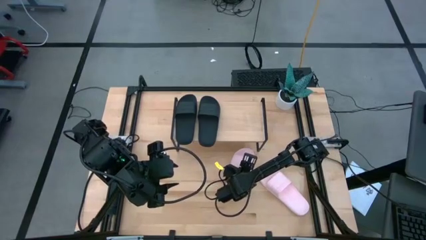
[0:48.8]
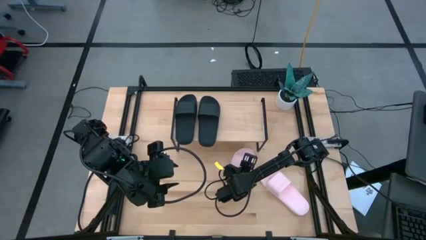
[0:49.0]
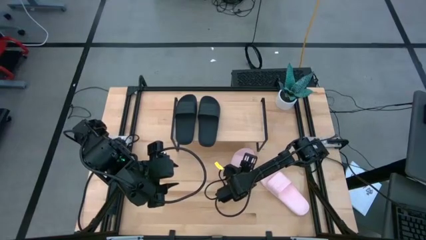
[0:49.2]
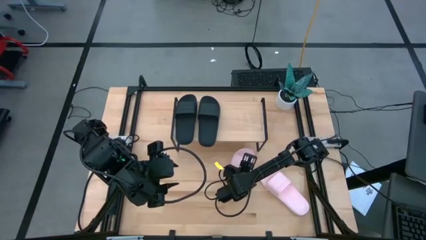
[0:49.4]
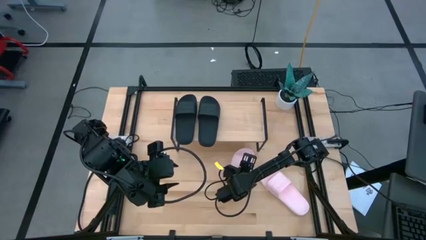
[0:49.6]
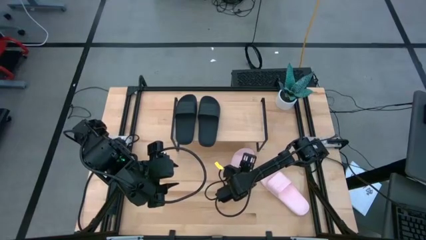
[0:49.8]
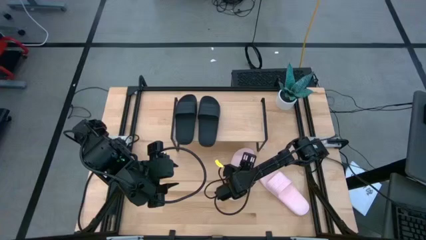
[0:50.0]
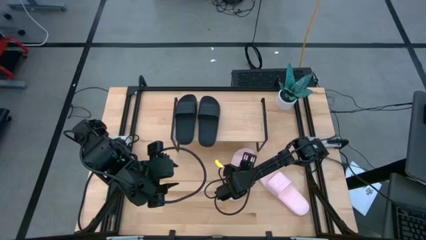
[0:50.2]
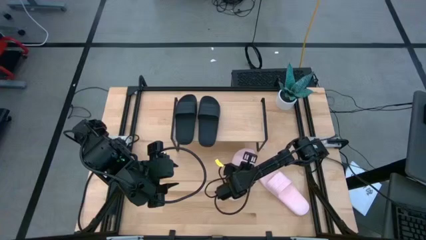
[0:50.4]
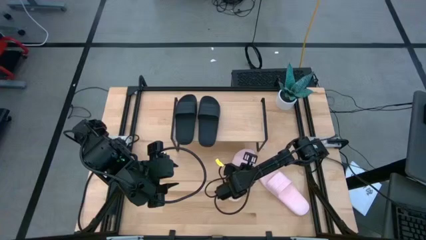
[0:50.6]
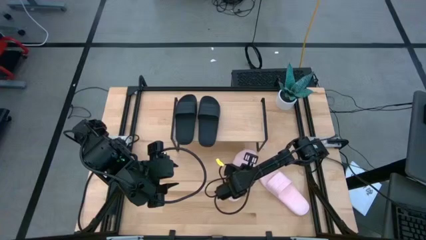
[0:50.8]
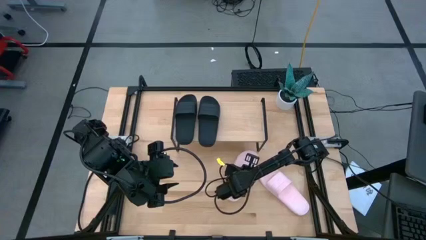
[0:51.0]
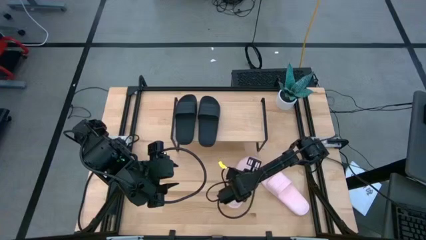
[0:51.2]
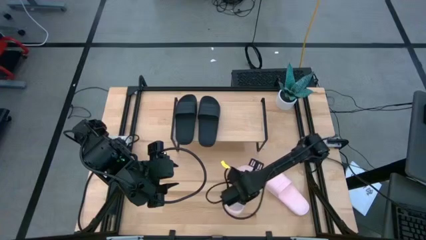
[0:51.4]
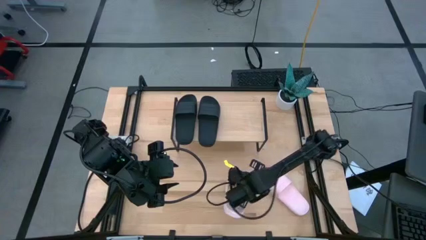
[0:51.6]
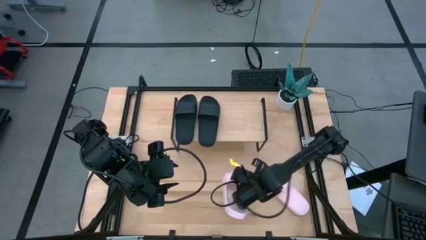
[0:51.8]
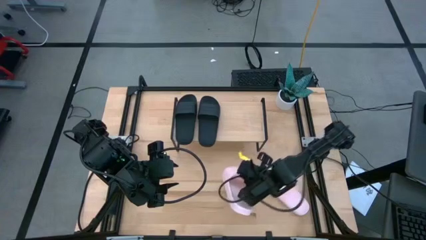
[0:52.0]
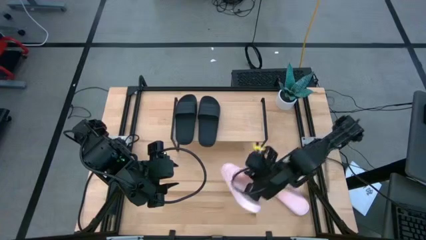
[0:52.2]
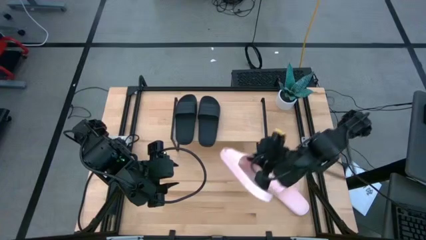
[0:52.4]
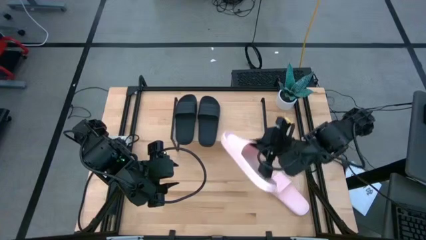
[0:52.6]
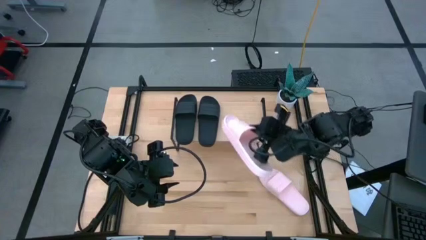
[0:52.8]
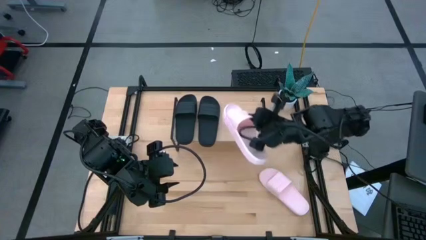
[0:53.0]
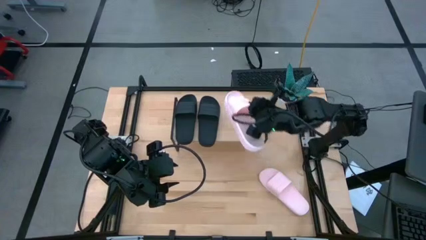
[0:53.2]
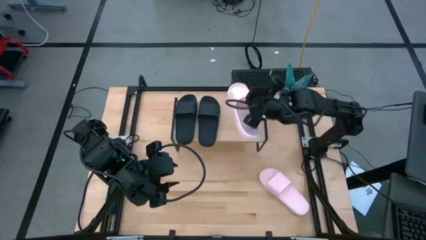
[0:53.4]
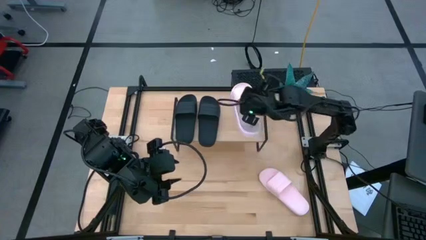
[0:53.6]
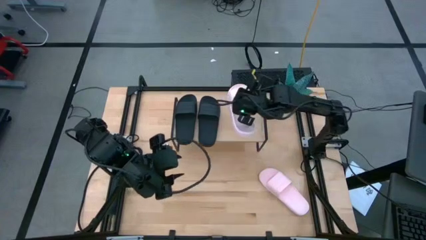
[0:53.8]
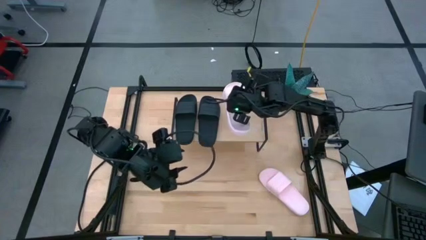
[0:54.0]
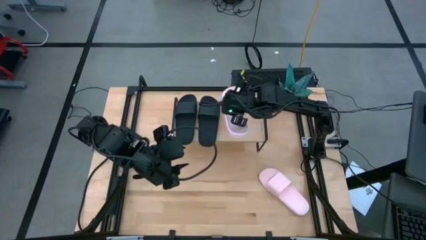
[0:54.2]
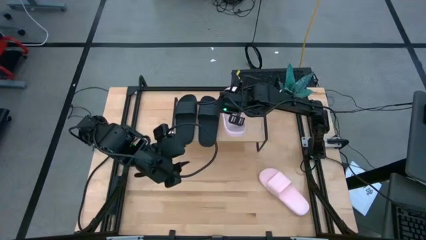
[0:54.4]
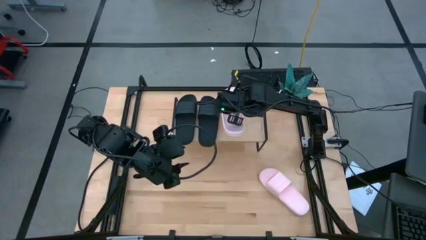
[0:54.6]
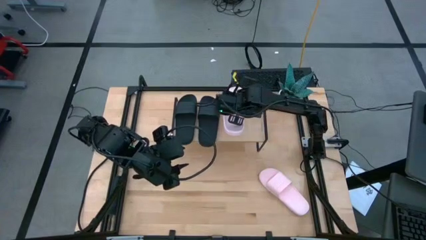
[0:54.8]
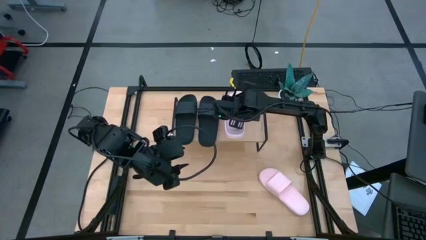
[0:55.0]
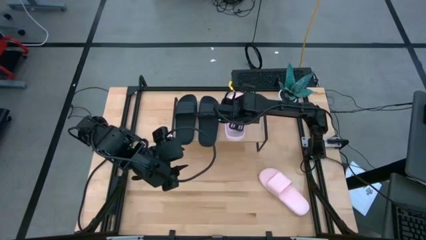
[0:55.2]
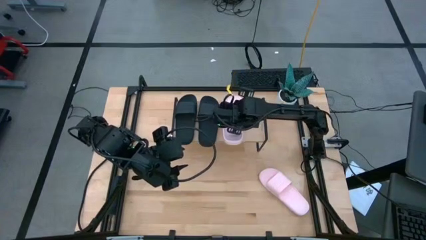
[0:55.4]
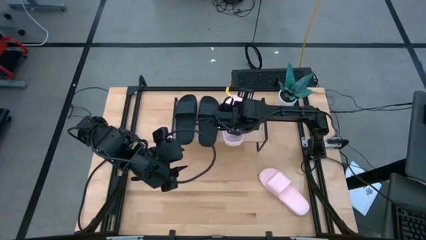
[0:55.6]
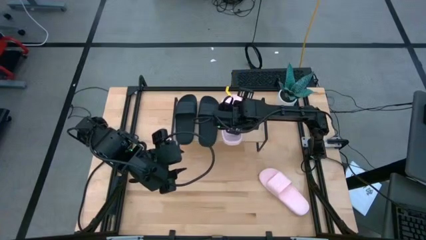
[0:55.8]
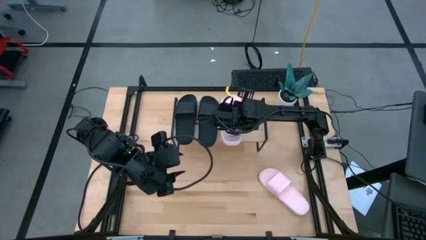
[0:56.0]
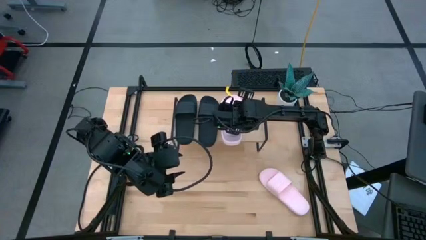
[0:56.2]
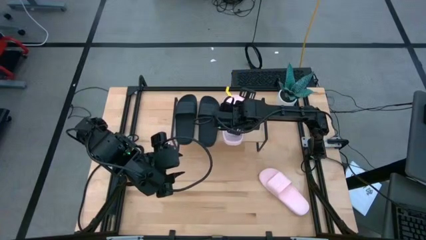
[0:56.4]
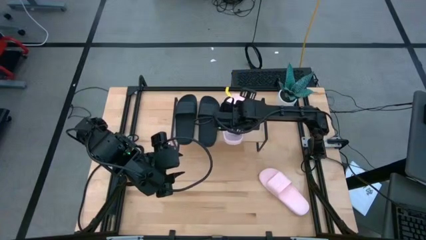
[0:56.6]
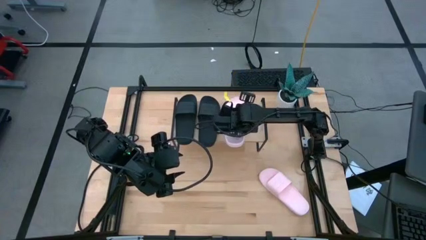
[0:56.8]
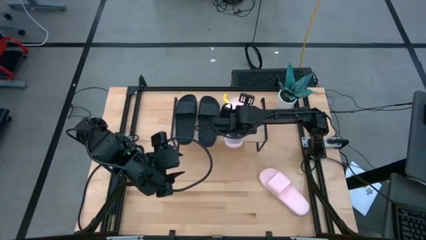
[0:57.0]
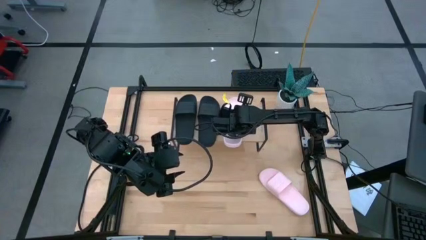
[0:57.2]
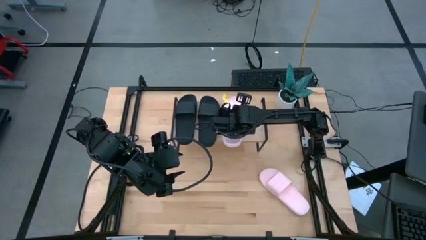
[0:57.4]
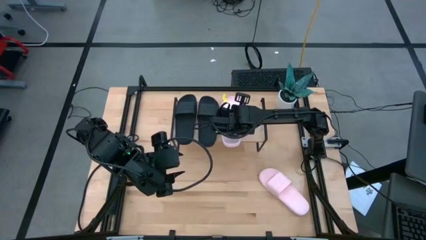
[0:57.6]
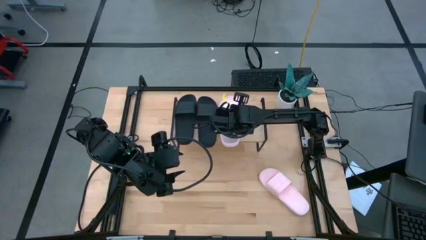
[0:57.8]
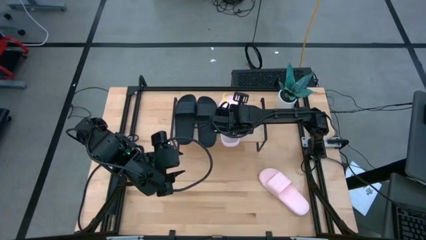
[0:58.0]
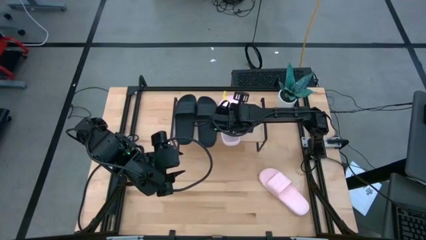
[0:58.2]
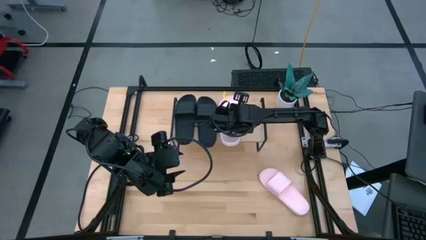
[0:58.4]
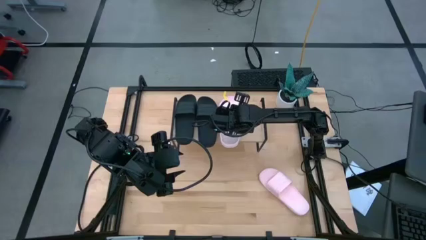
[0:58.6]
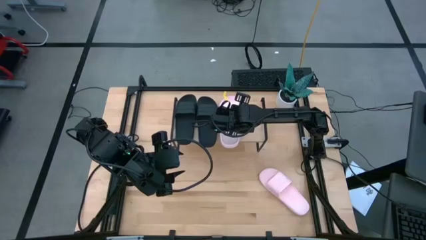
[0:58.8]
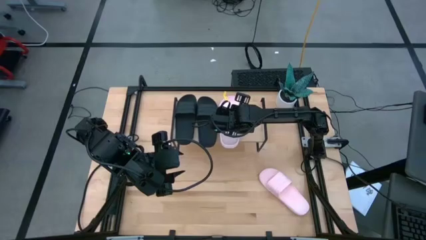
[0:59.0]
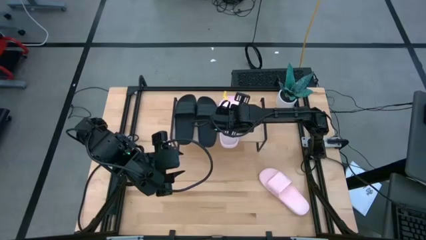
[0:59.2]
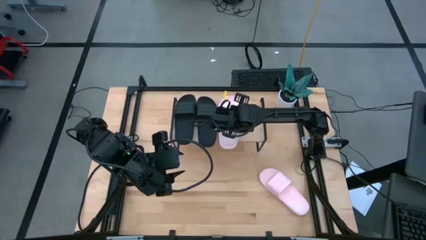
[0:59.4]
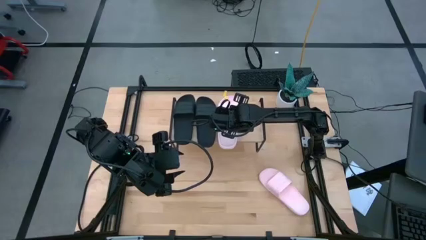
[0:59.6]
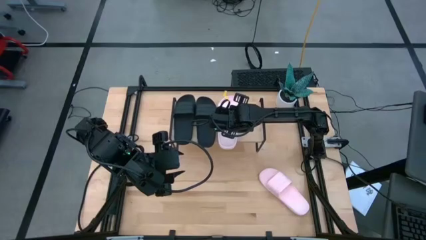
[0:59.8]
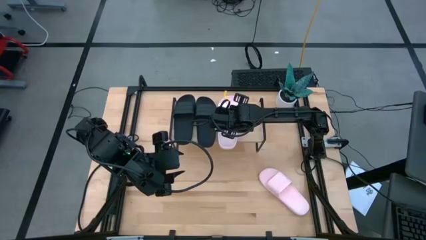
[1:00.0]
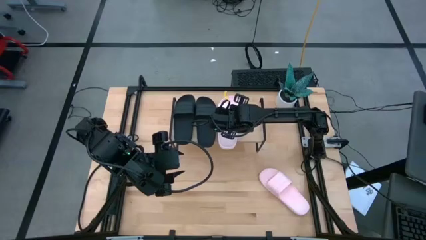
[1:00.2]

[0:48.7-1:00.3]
Task: Pick and place slides into the shelf
Put the left pink slide next to the black slide on the shelf
